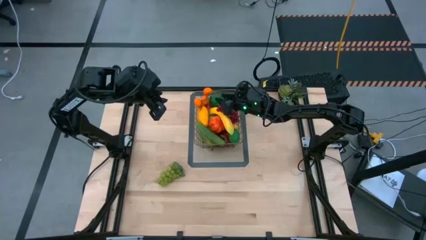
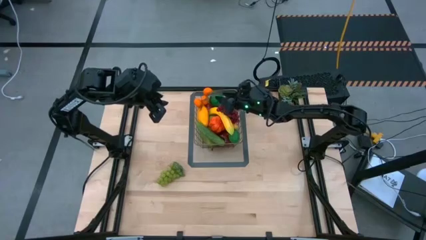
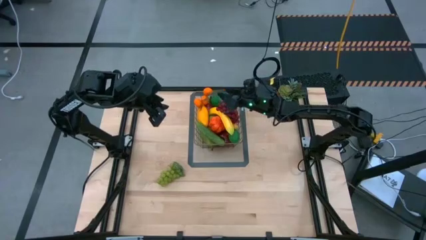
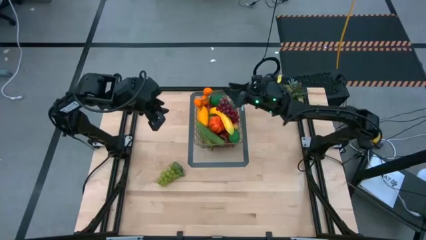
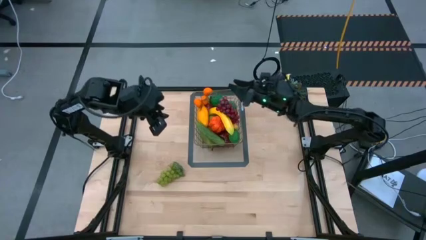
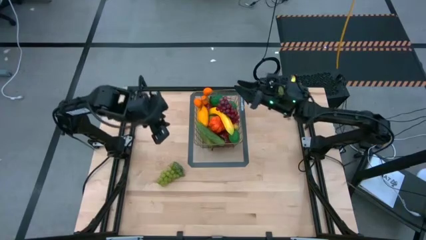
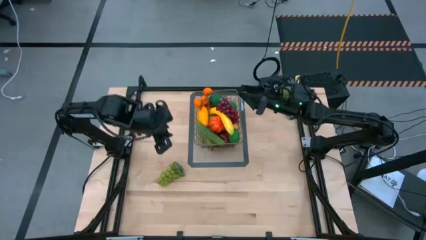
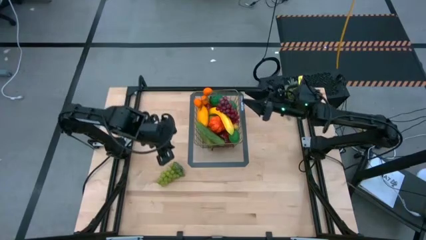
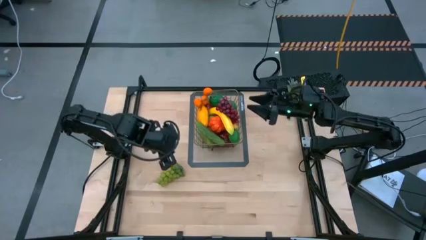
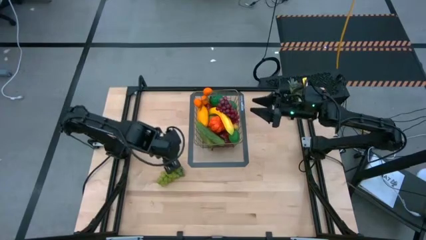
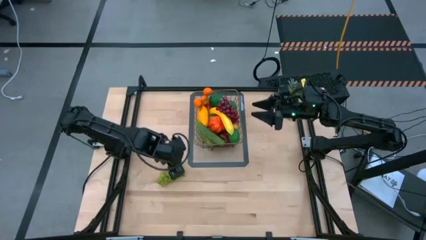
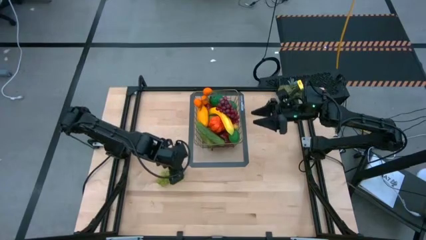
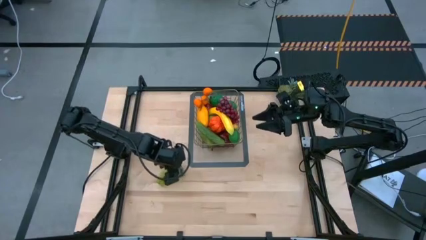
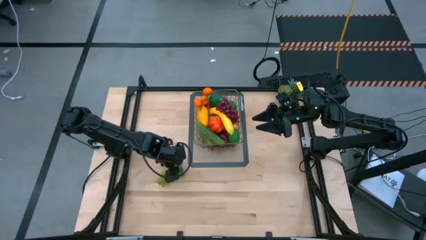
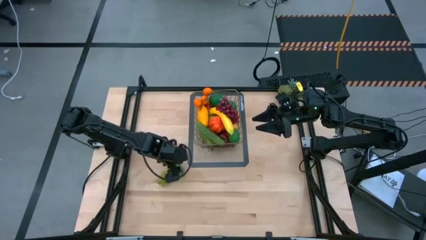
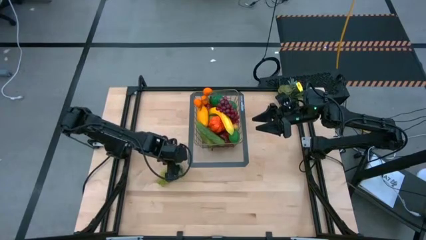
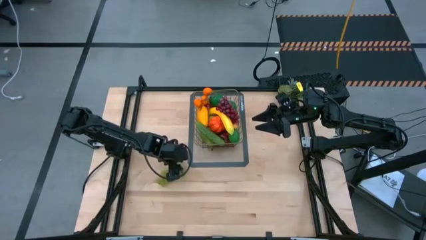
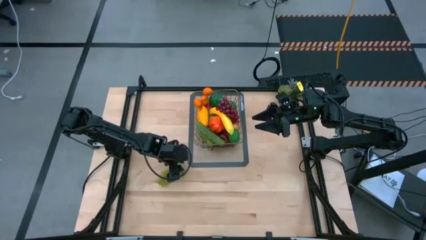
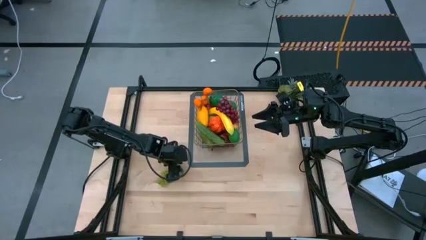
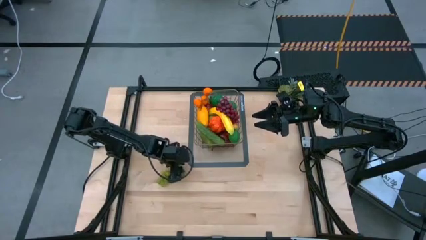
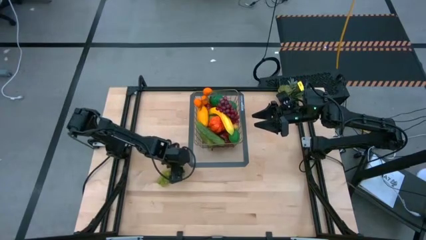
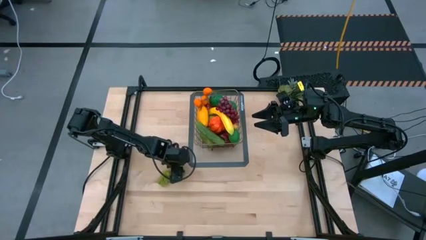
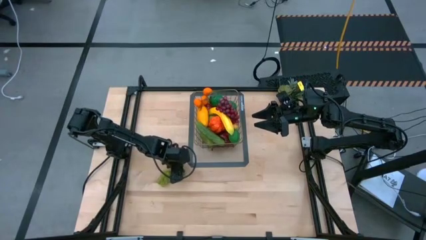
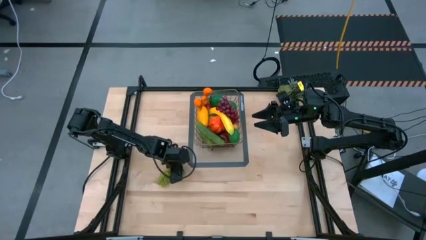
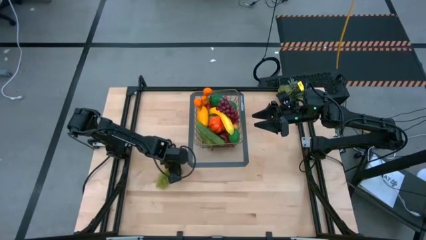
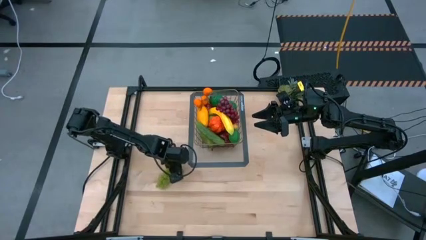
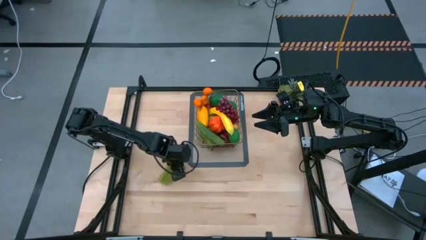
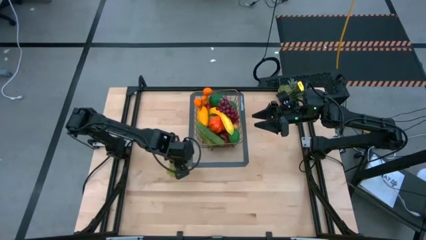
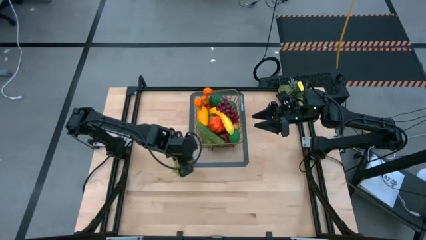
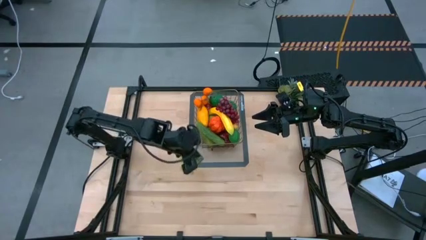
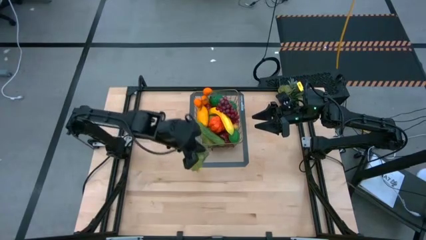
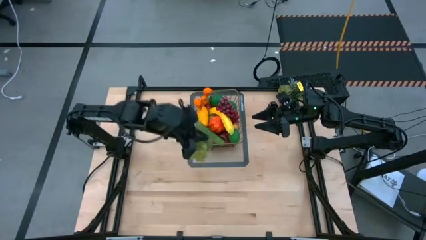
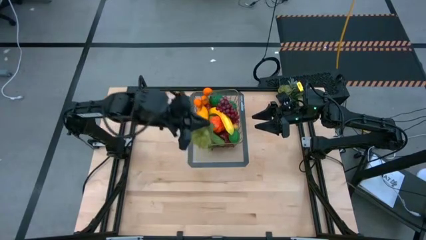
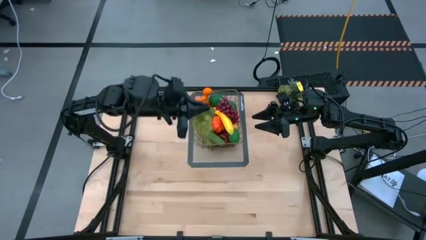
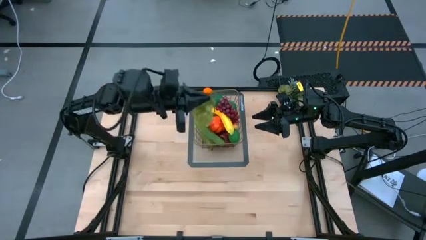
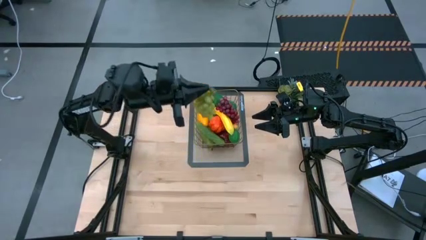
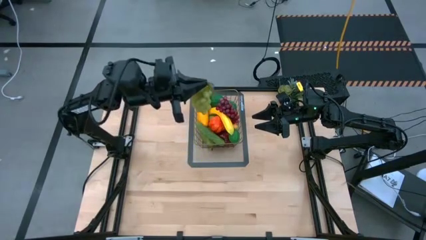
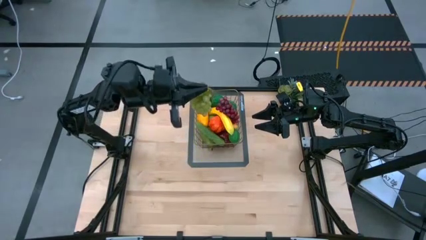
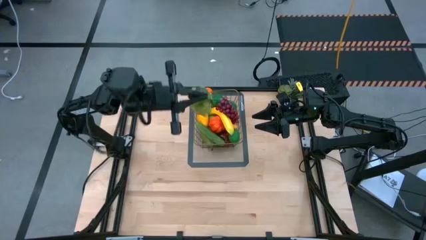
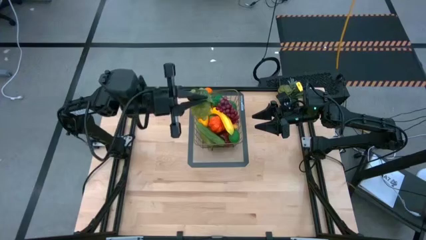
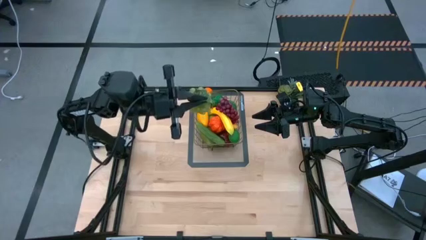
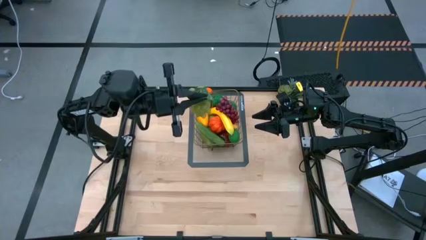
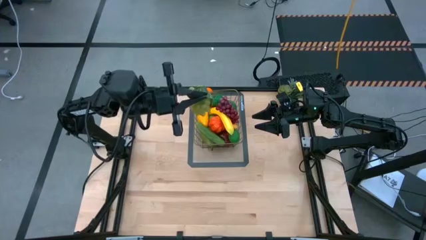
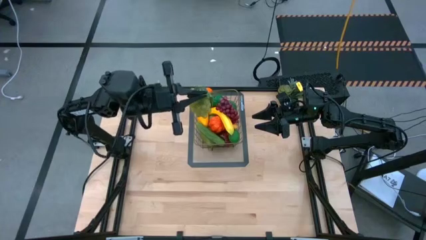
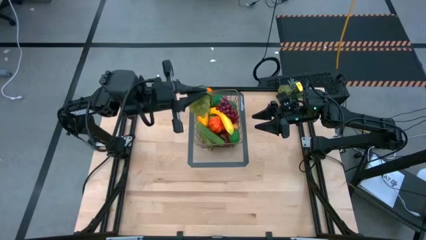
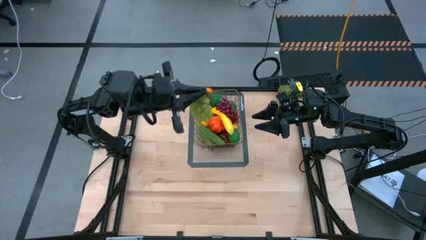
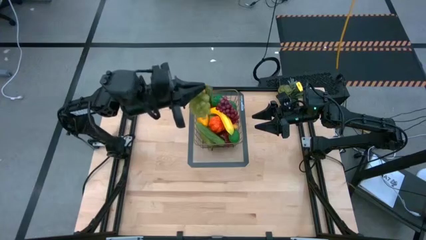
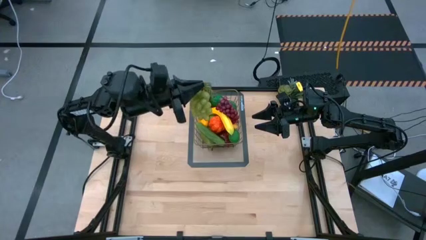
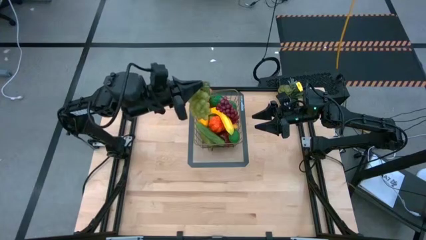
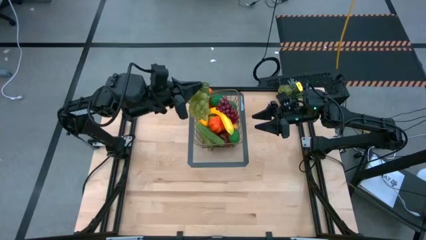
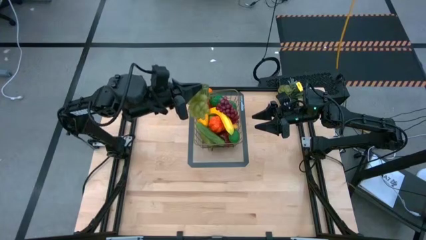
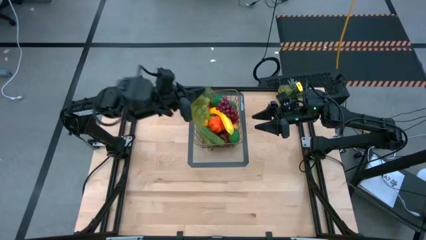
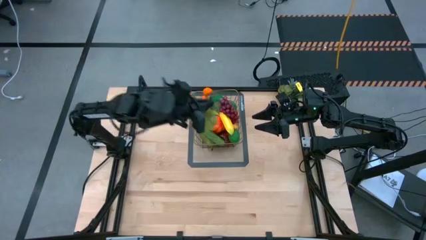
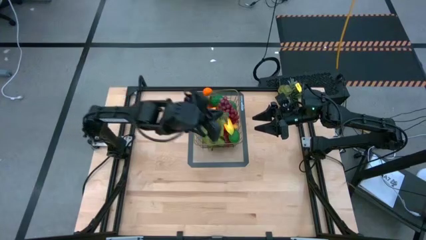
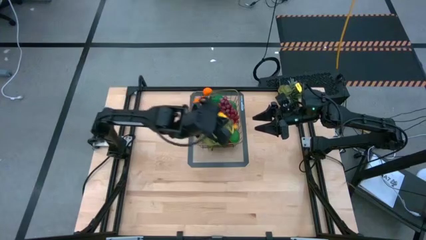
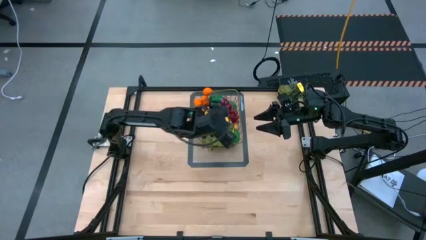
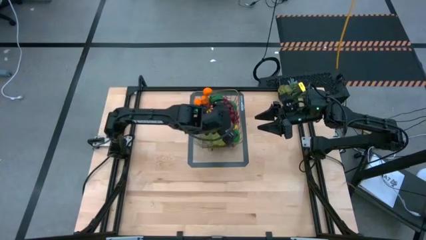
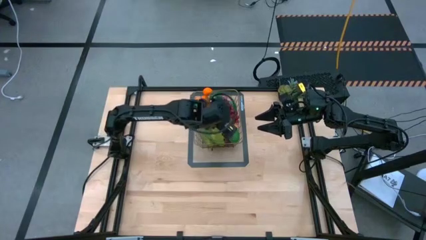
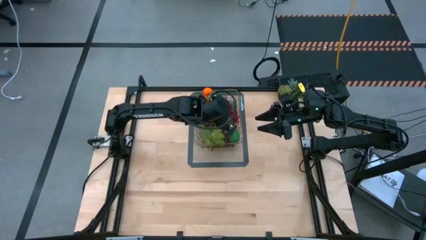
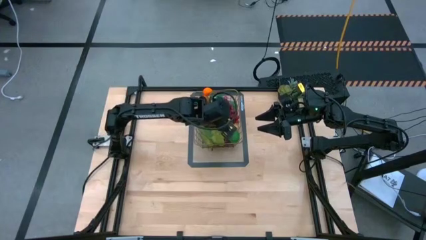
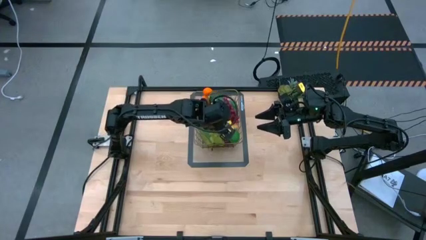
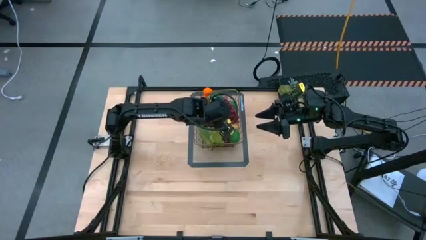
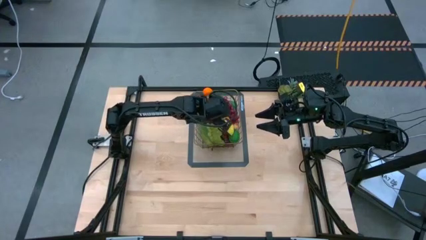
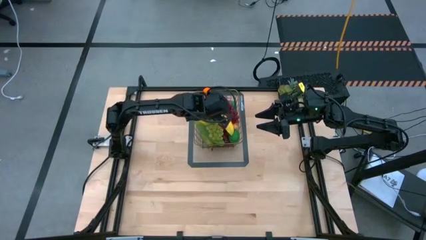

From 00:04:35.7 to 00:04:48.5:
Task: Build produce basket
Put the green grapes into the gold wire basket

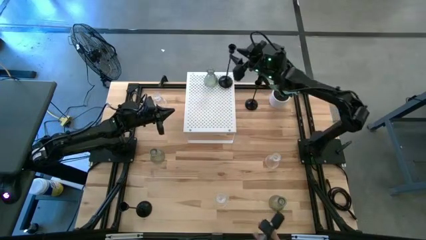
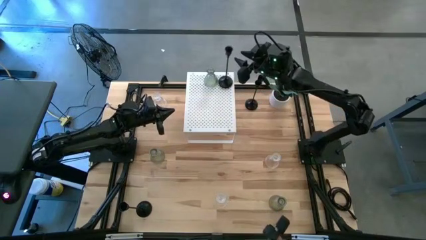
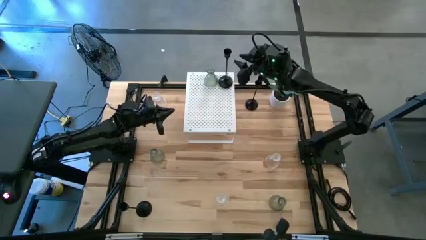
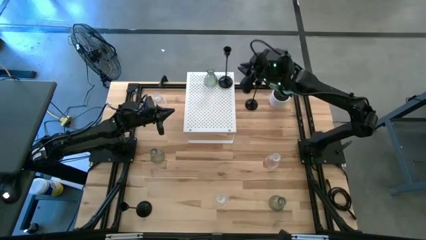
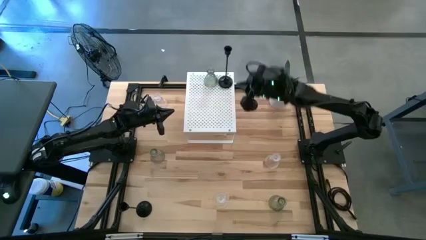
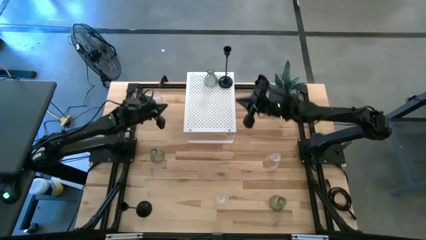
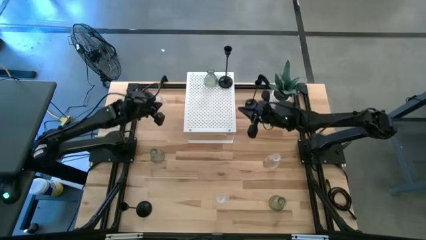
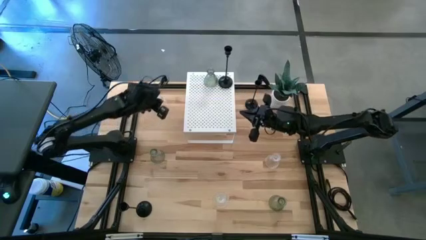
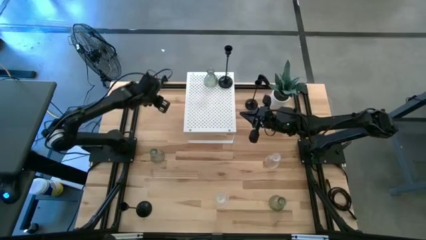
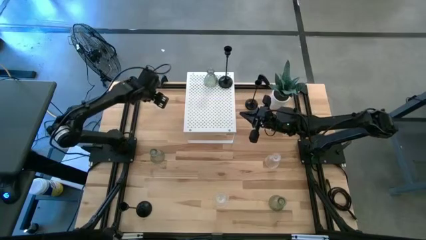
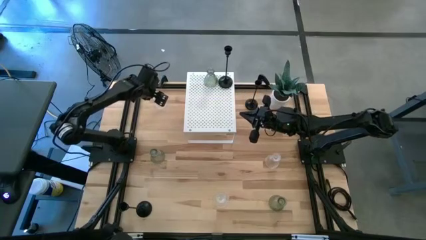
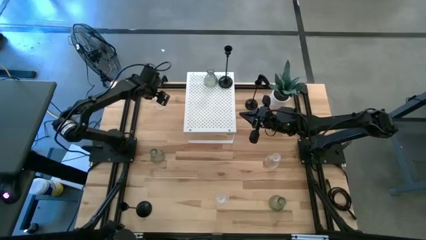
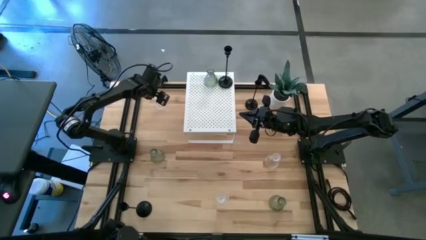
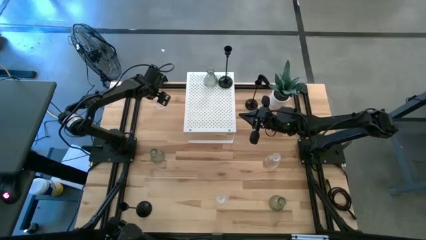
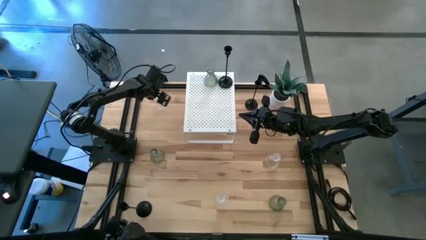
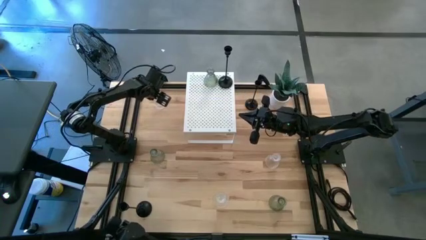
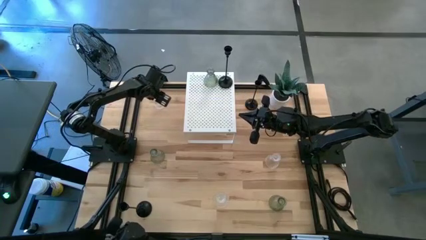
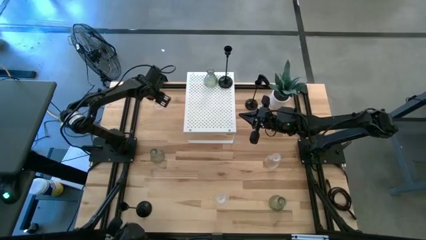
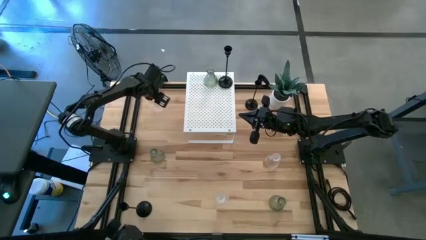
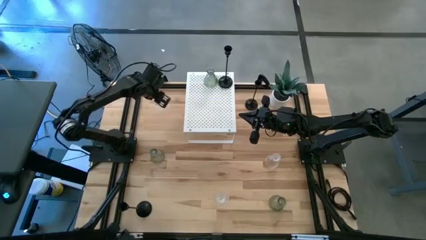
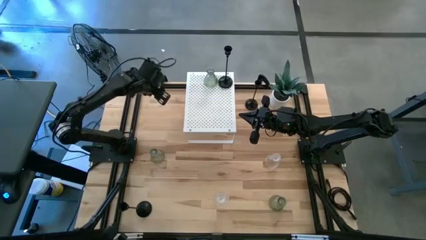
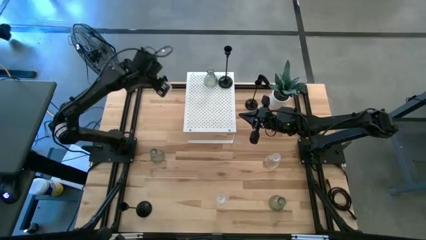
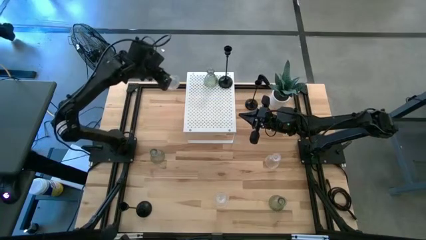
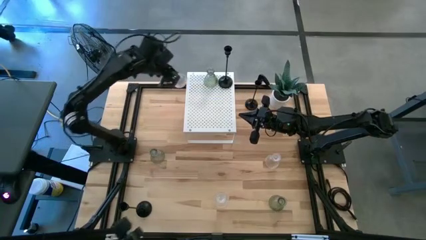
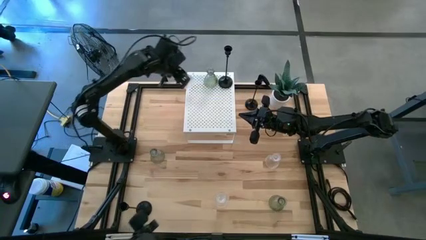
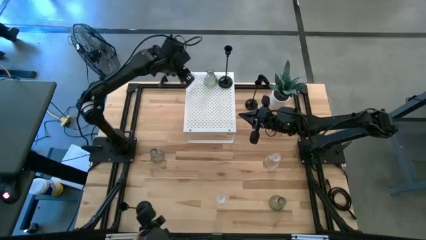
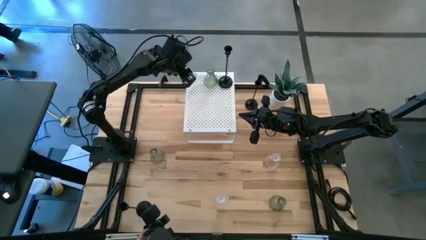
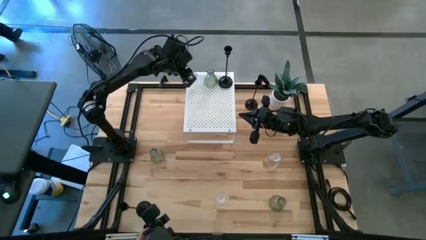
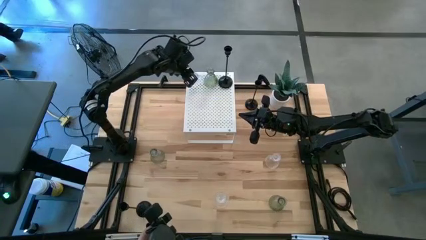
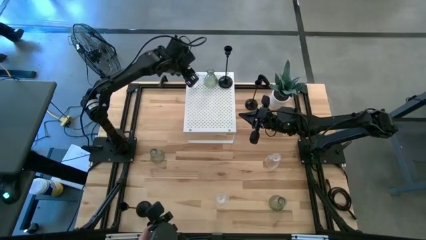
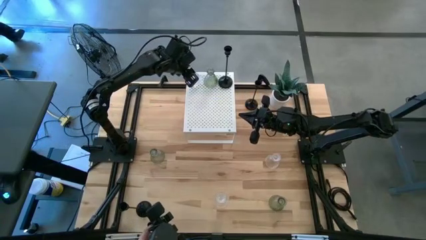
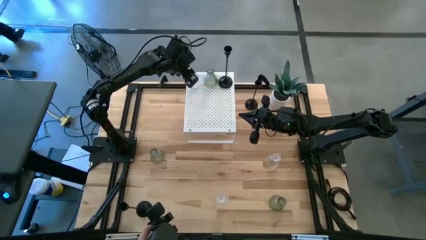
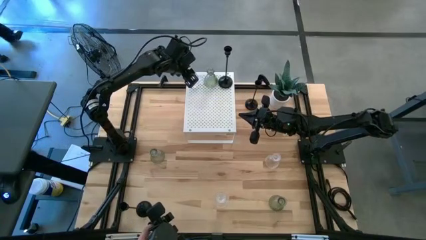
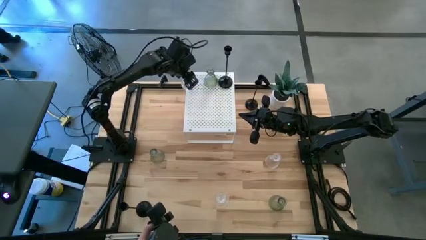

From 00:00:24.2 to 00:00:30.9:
Task: Pick & Place candle stick holders
Put the top left transparent glass candle holder on the shelf
